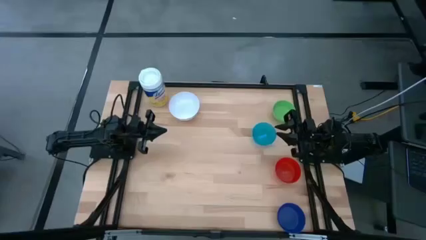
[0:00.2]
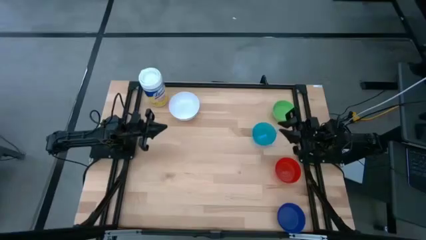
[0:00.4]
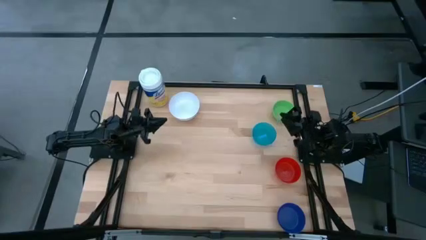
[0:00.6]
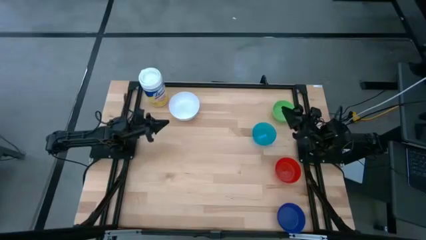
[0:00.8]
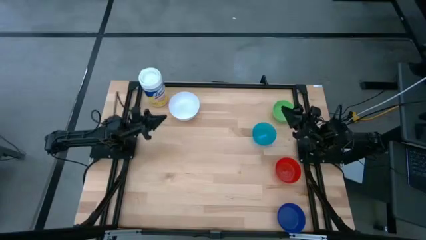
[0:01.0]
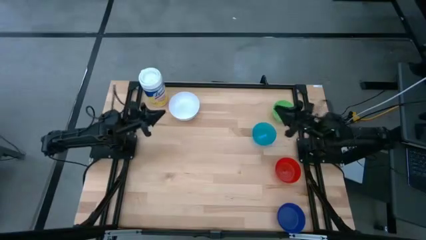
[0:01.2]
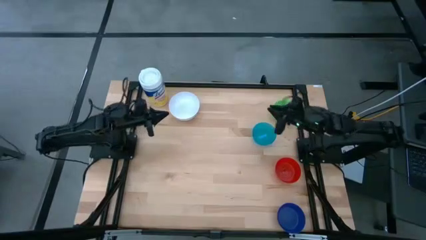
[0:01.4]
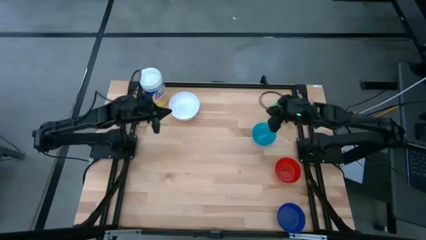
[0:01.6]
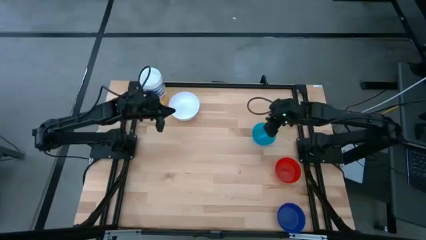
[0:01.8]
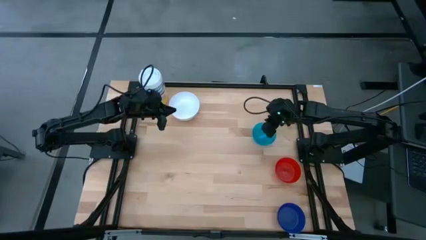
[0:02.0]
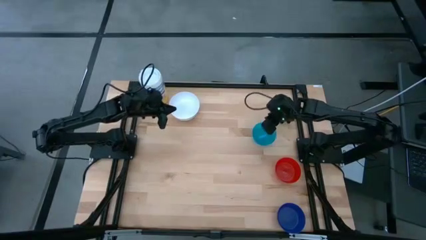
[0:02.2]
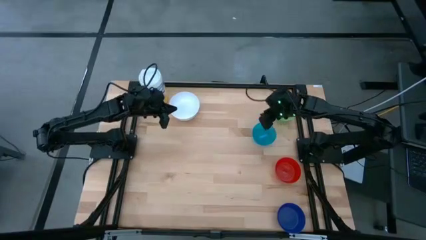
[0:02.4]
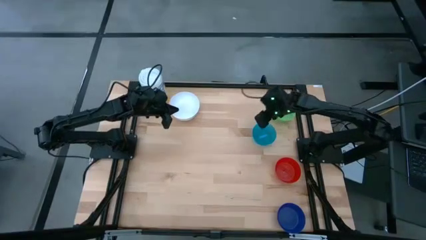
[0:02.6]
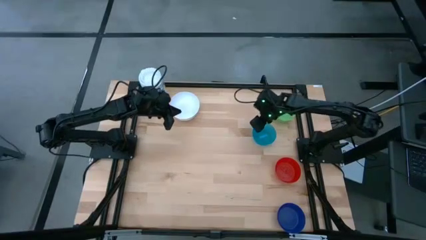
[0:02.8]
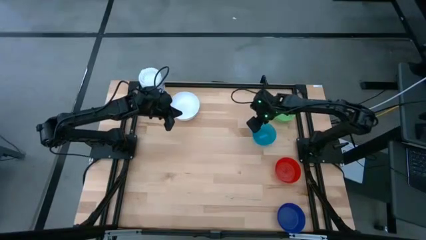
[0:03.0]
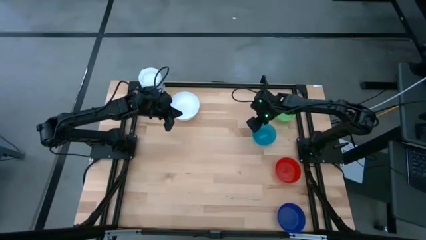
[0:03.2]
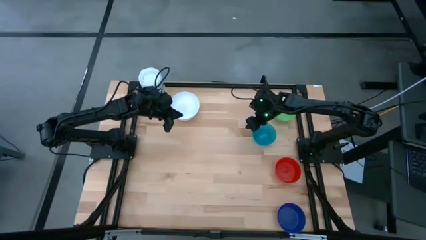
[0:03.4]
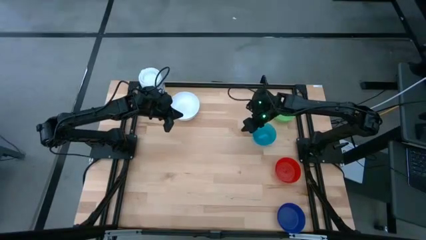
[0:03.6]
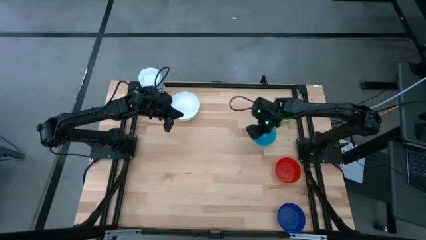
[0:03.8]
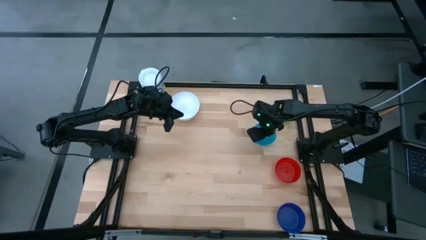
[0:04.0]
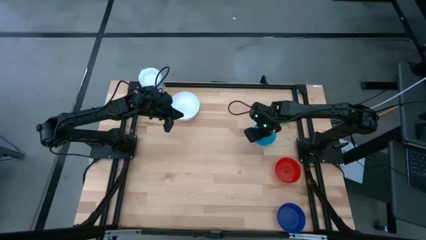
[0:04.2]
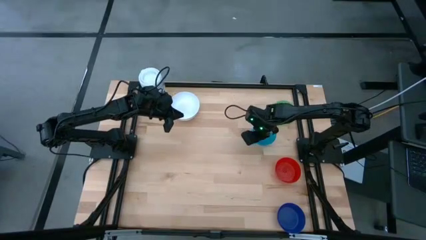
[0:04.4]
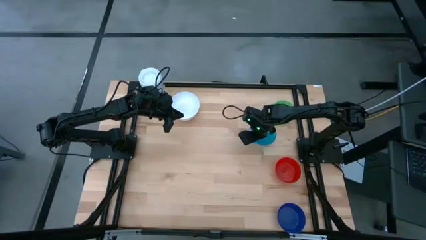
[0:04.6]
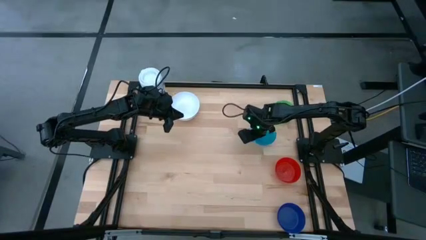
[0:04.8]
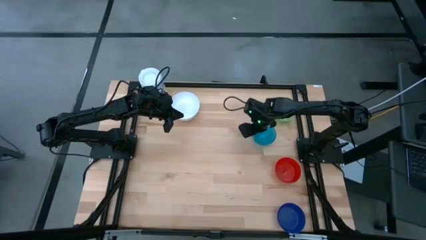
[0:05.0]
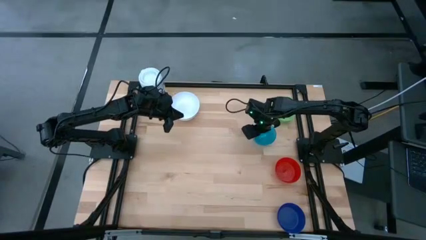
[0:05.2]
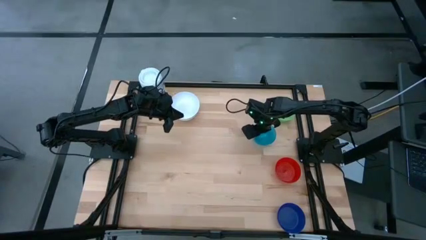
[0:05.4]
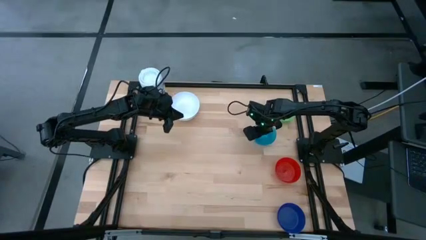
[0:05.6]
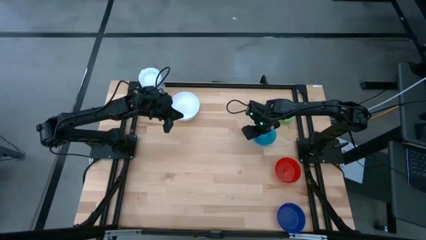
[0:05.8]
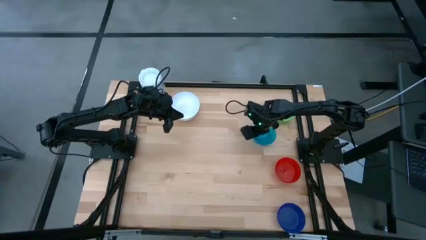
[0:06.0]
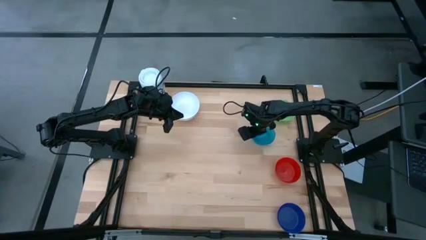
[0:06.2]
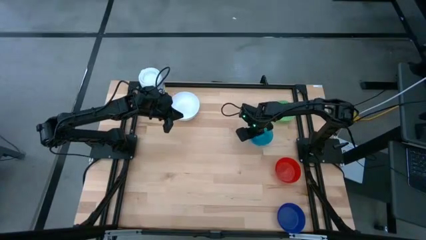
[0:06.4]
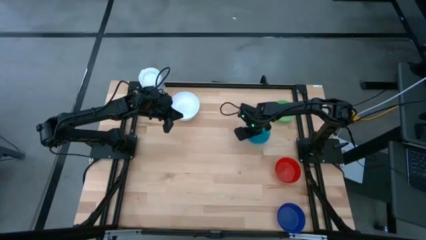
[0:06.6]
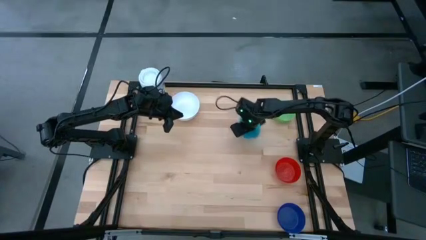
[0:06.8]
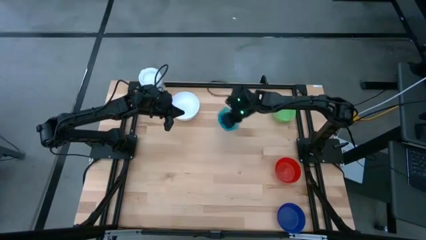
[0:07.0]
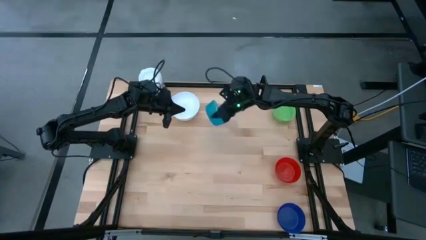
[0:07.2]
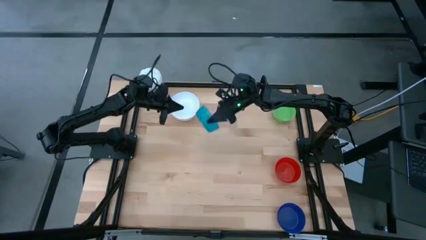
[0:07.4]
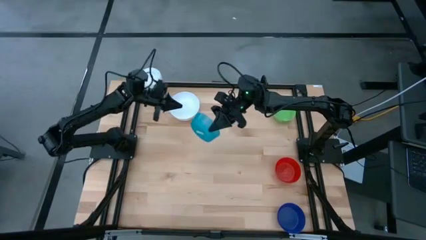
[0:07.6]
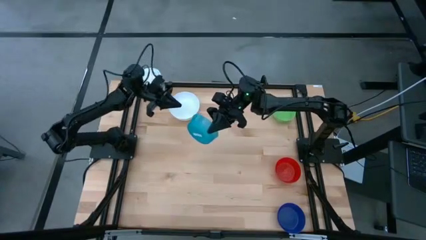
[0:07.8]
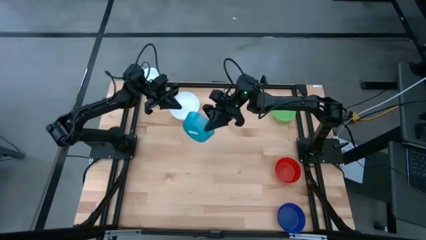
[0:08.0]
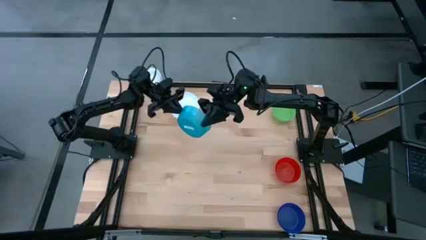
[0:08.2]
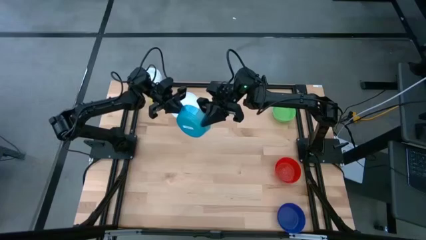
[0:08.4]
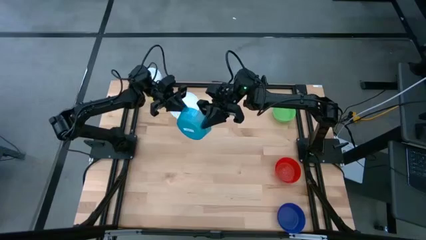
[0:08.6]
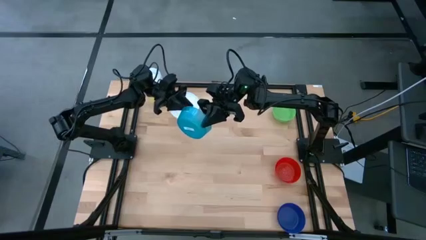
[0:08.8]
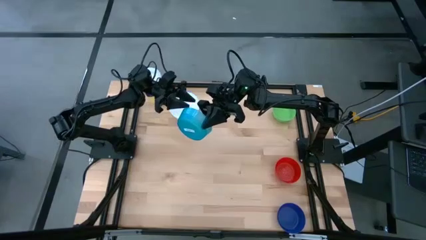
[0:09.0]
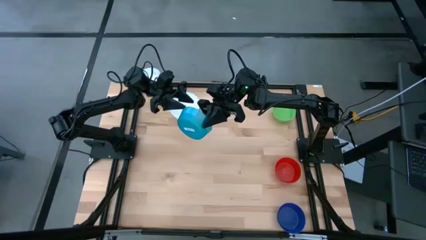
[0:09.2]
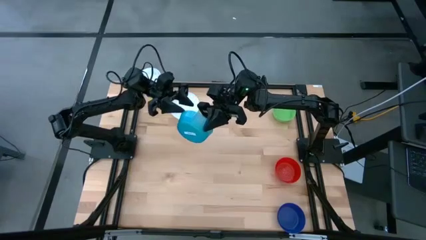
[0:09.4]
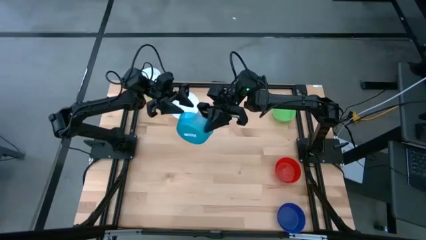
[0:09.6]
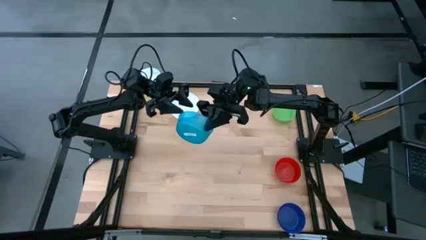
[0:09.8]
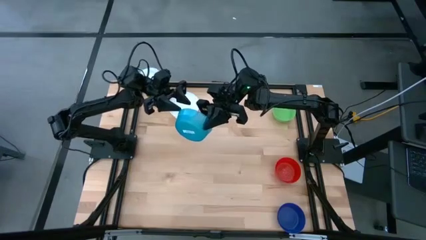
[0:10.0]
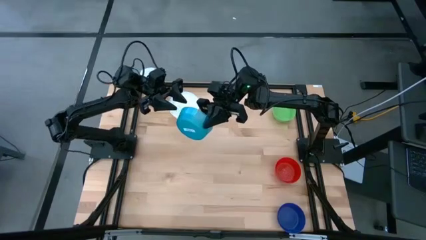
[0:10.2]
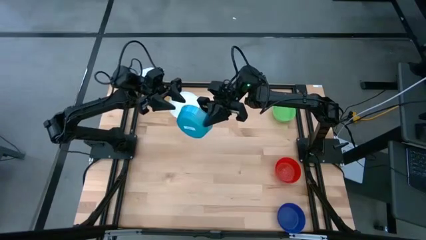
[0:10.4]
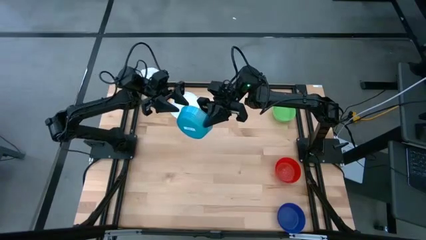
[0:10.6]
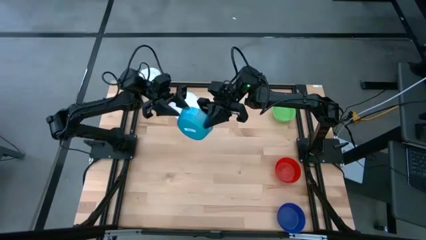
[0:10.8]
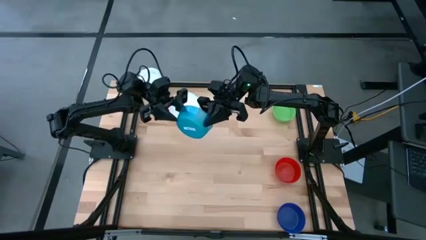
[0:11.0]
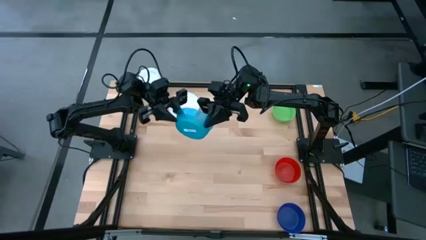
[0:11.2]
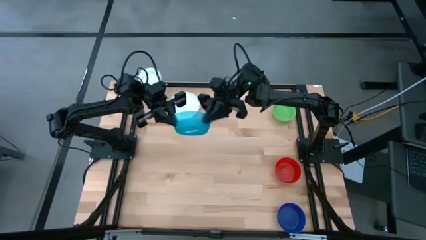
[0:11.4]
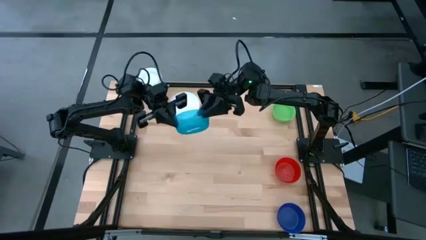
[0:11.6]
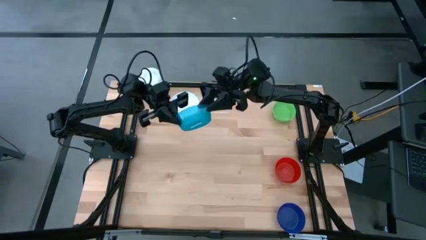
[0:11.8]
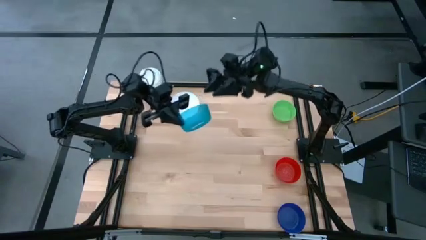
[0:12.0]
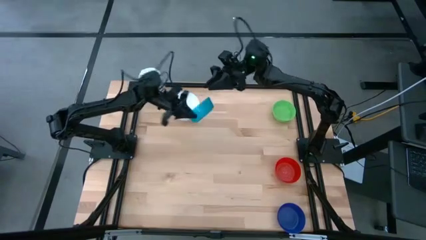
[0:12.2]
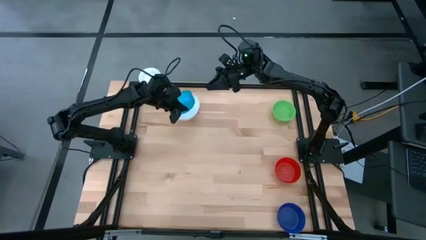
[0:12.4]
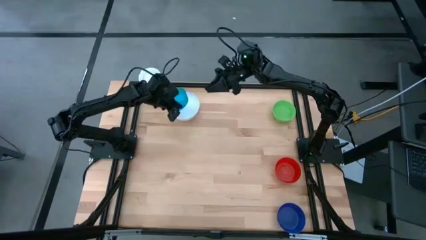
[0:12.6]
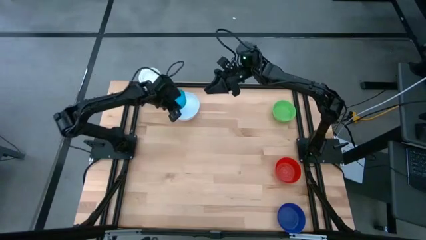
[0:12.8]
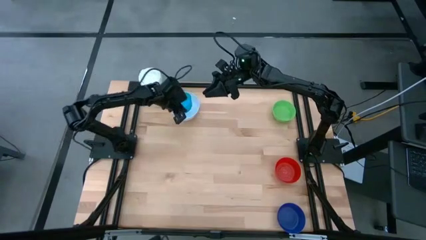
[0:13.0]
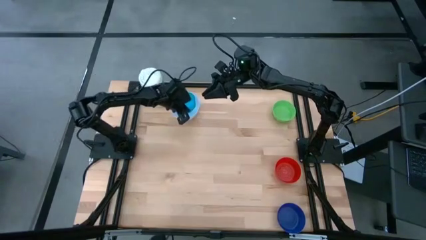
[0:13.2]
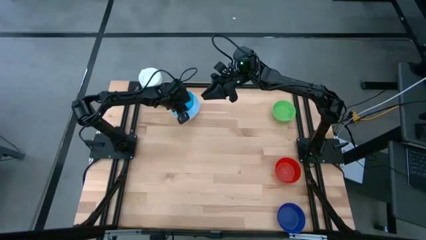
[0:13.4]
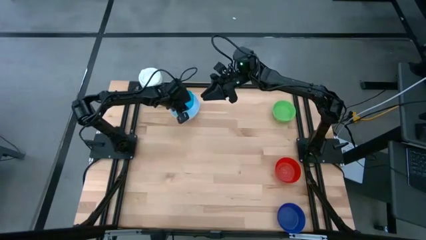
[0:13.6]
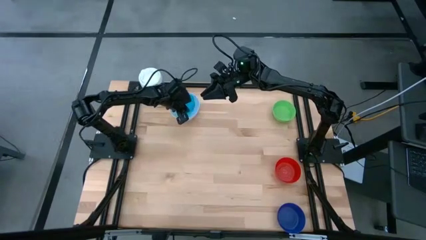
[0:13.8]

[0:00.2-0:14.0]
Stack the light blue bowl on top of the white bowl
